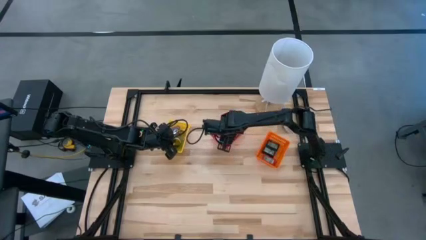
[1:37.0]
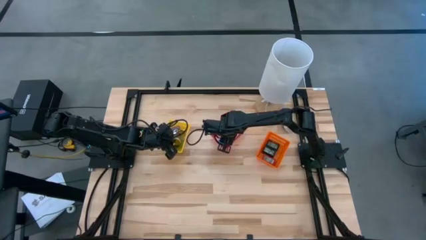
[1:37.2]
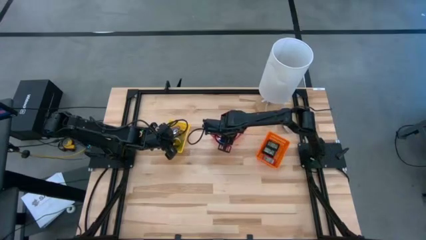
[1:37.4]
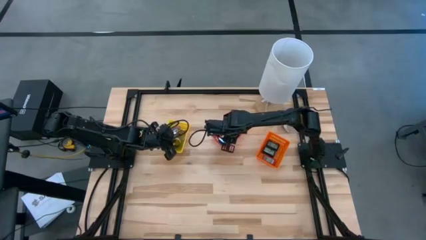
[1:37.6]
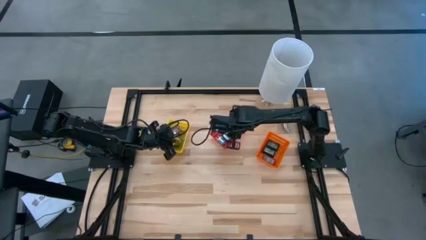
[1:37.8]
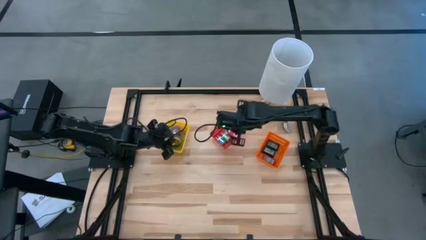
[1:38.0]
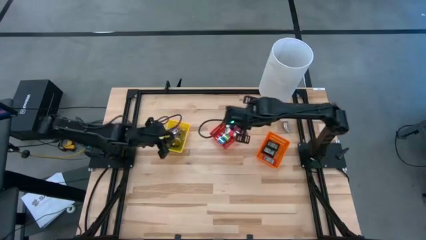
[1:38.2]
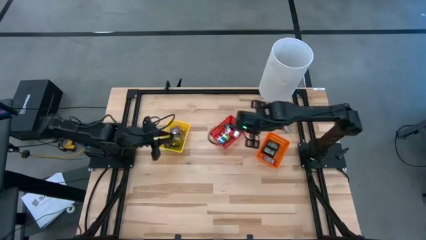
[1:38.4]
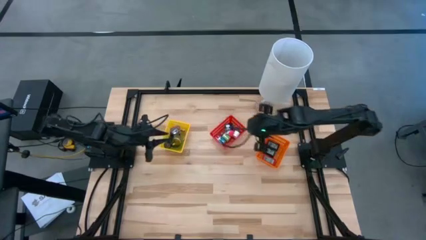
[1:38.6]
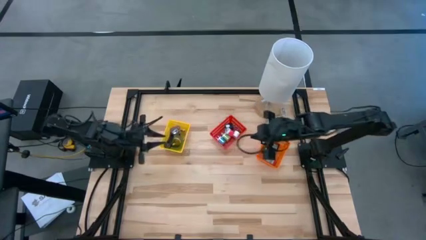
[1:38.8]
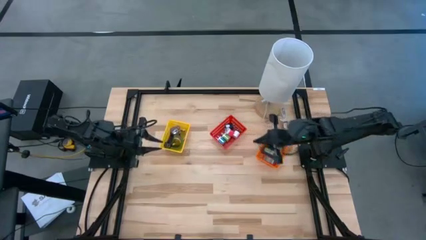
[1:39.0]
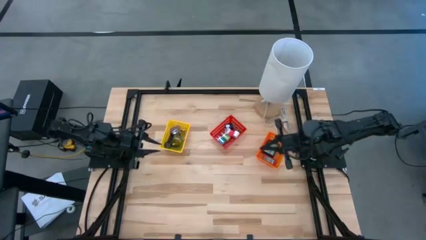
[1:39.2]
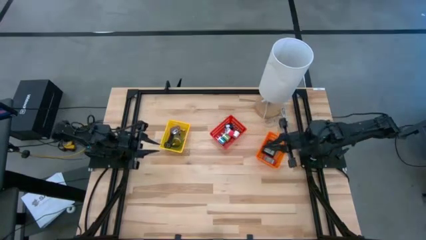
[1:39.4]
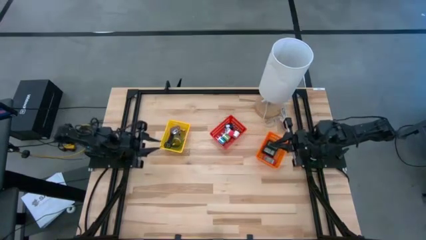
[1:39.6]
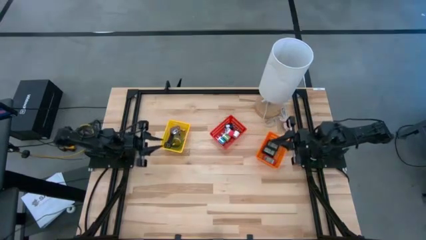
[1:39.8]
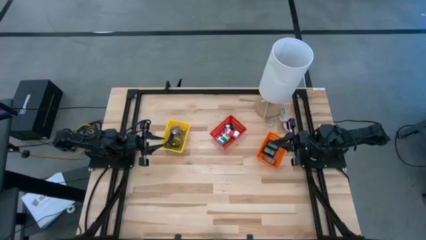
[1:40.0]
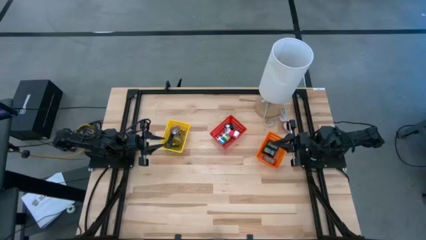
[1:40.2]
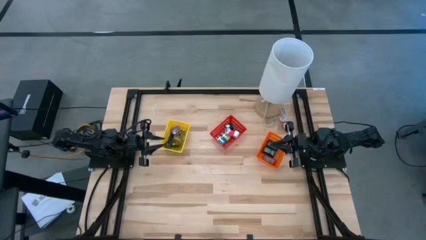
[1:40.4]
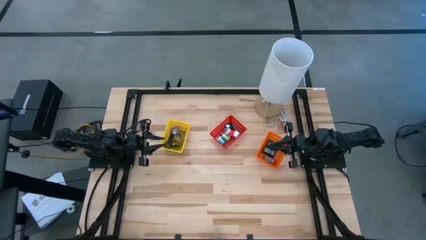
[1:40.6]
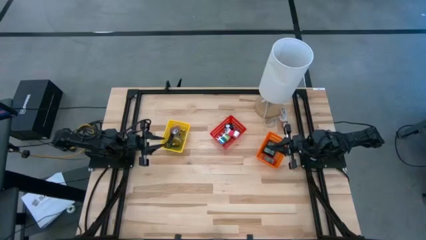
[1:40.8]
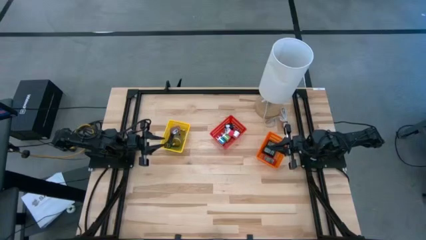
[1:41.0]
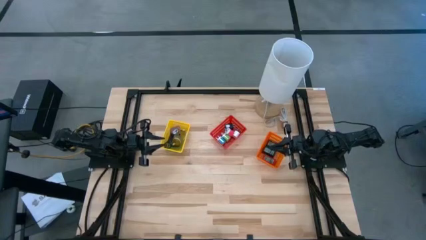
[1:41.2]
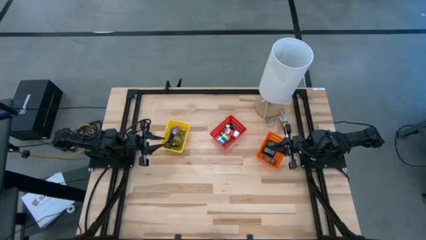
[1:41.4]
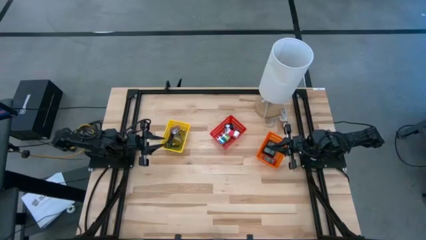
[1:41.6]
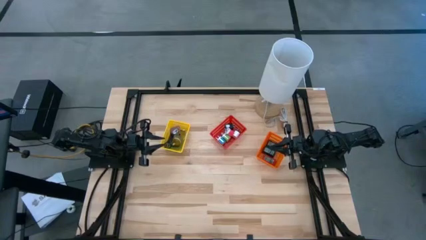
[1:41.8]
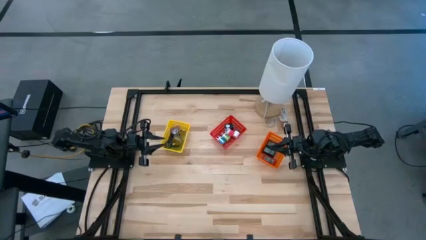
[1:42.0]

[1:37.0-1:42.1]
Task: Pick & Place Office items
Return to Home Position

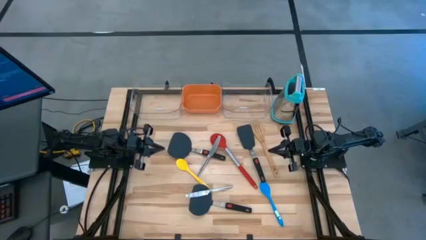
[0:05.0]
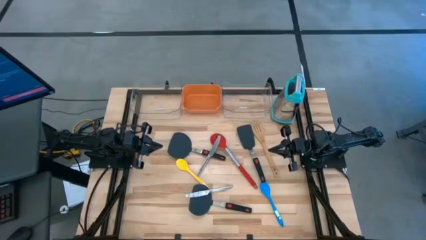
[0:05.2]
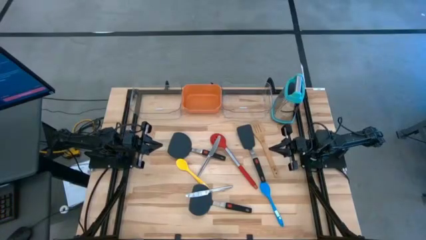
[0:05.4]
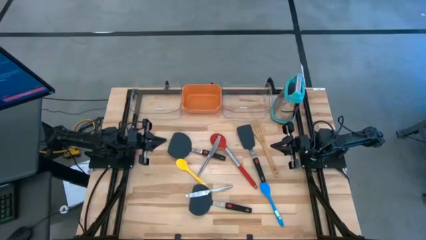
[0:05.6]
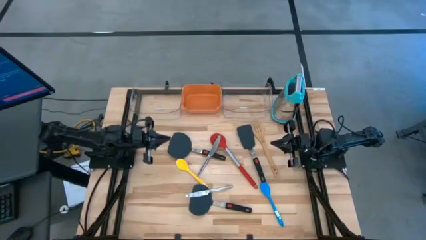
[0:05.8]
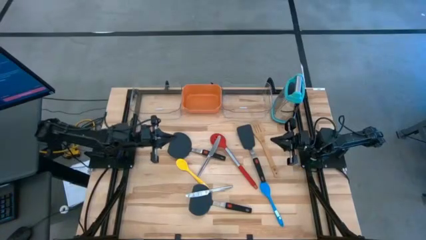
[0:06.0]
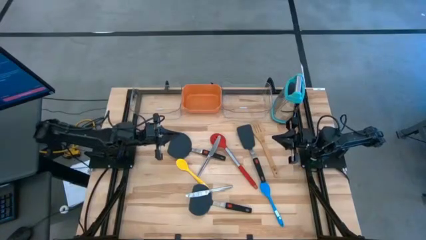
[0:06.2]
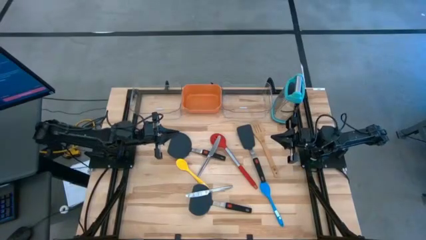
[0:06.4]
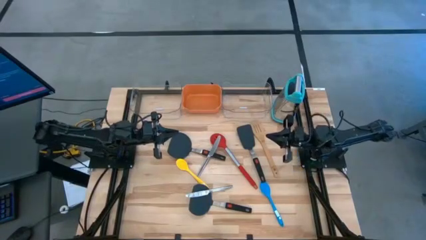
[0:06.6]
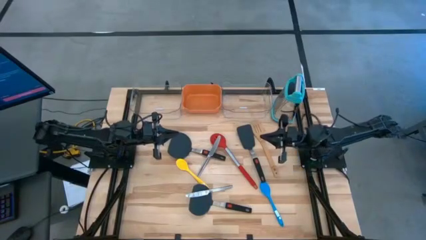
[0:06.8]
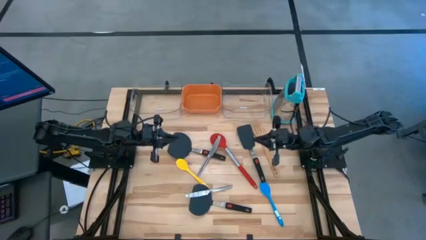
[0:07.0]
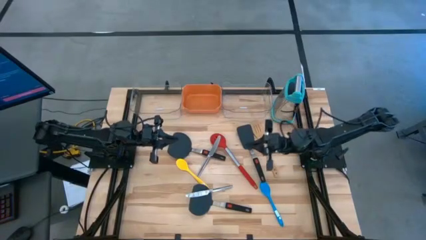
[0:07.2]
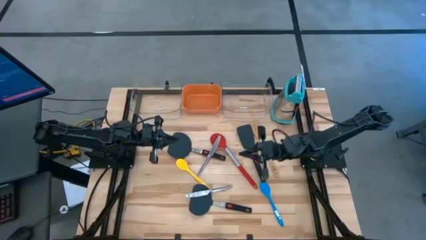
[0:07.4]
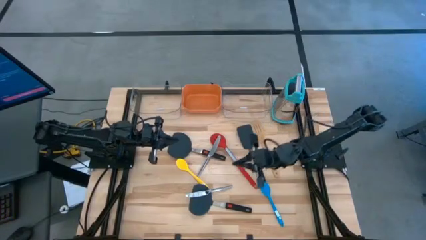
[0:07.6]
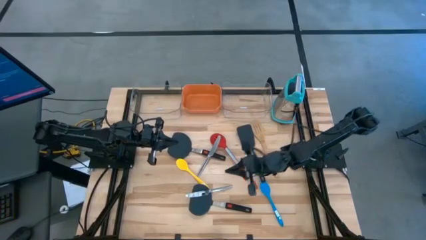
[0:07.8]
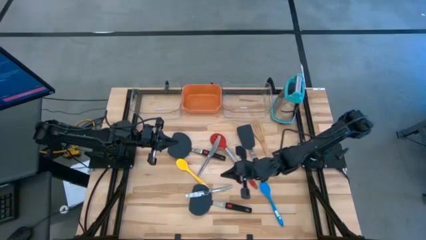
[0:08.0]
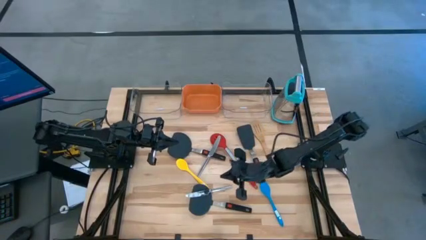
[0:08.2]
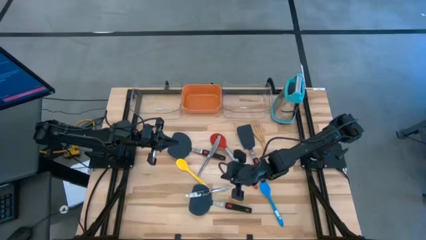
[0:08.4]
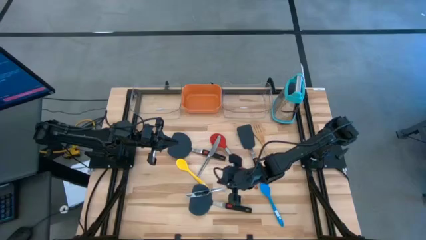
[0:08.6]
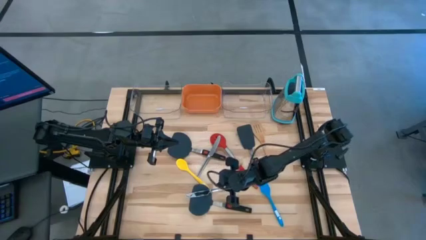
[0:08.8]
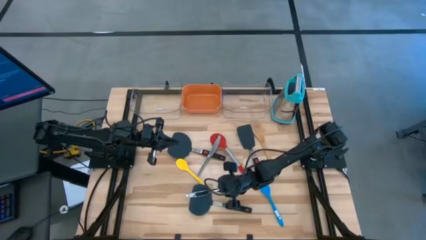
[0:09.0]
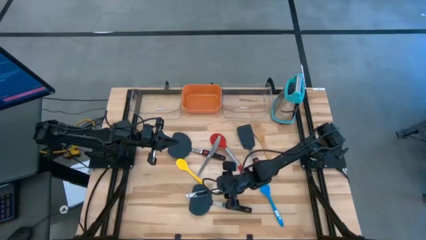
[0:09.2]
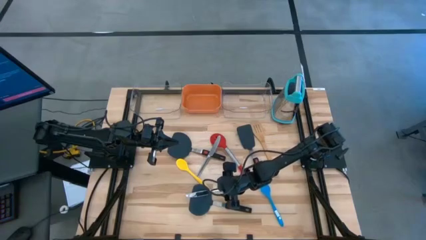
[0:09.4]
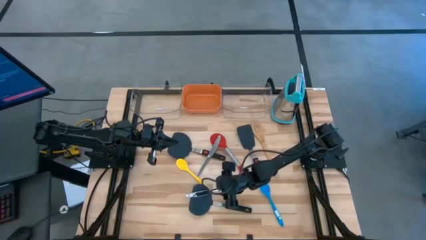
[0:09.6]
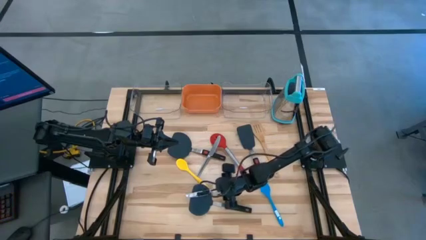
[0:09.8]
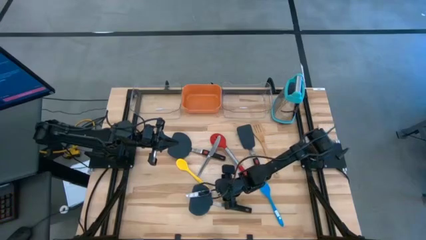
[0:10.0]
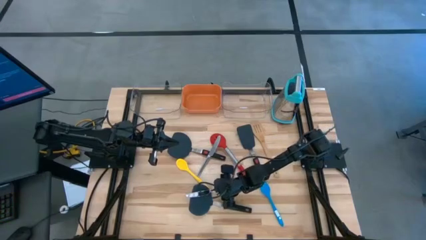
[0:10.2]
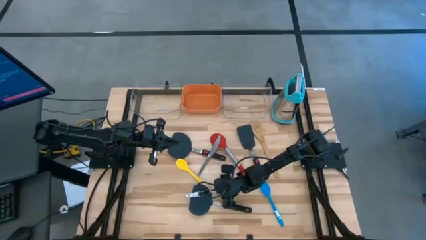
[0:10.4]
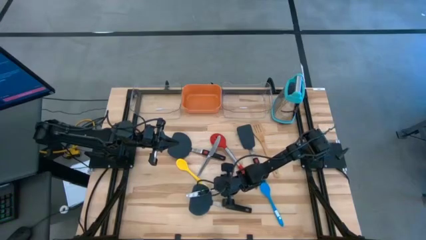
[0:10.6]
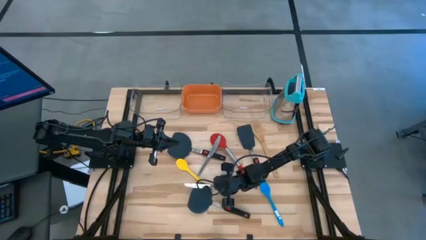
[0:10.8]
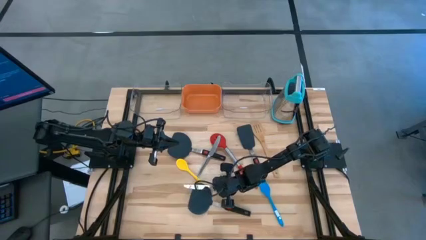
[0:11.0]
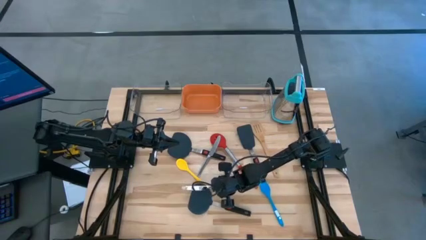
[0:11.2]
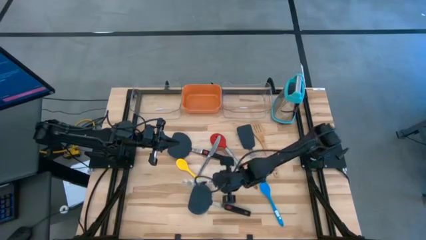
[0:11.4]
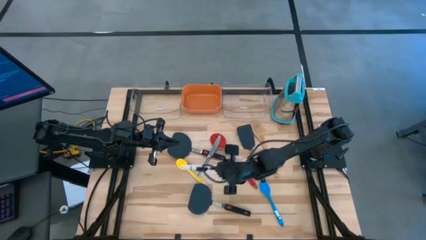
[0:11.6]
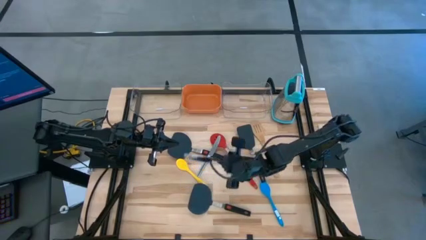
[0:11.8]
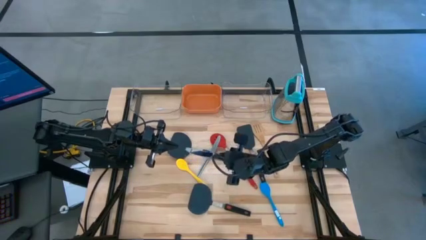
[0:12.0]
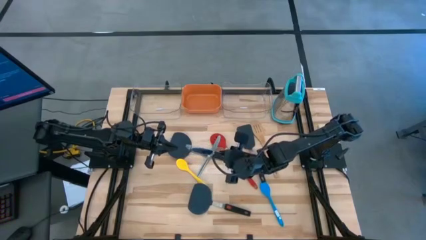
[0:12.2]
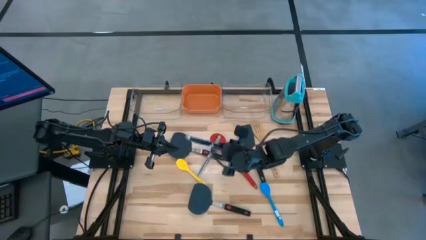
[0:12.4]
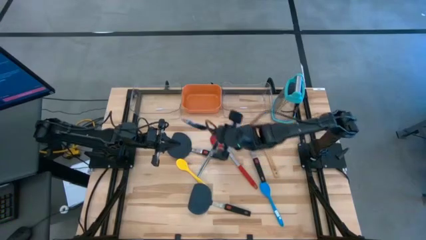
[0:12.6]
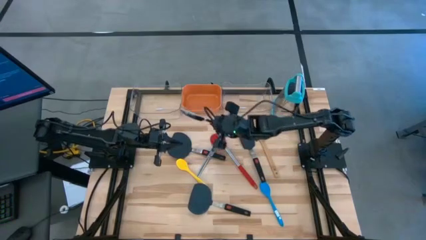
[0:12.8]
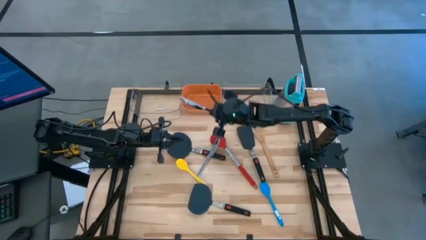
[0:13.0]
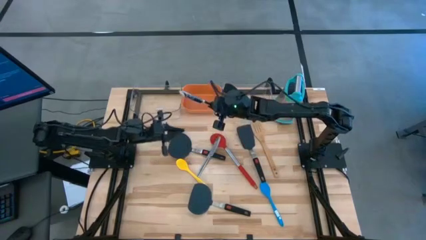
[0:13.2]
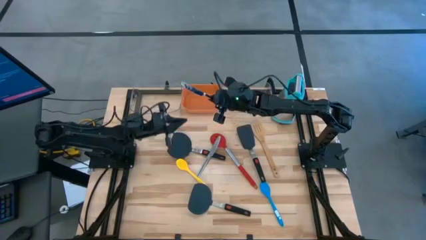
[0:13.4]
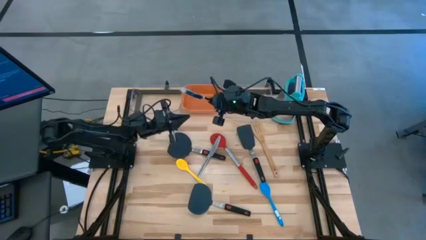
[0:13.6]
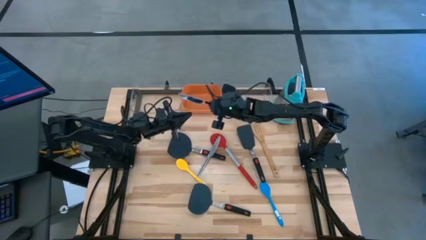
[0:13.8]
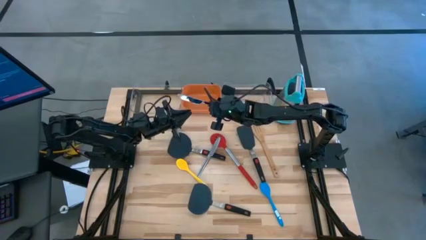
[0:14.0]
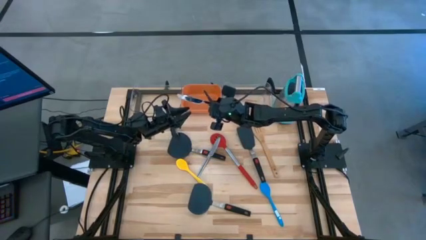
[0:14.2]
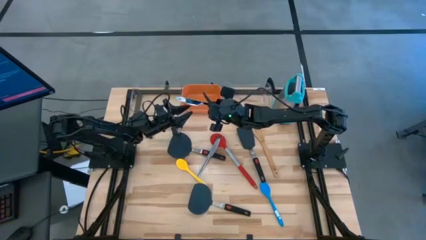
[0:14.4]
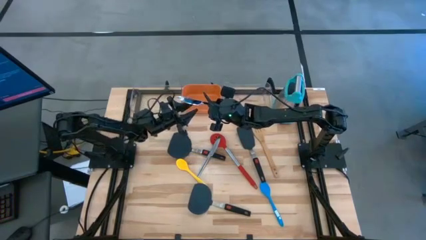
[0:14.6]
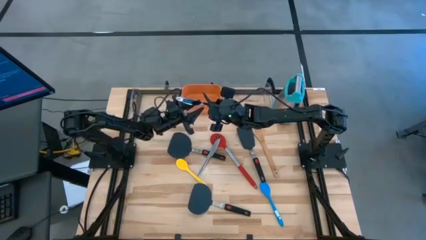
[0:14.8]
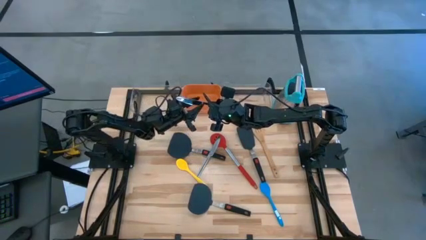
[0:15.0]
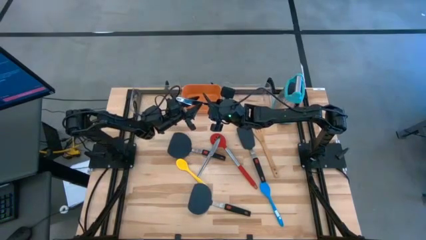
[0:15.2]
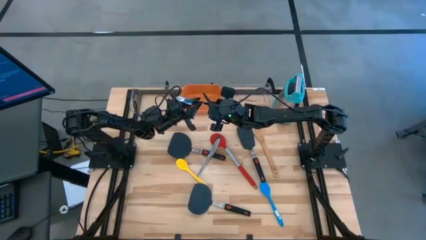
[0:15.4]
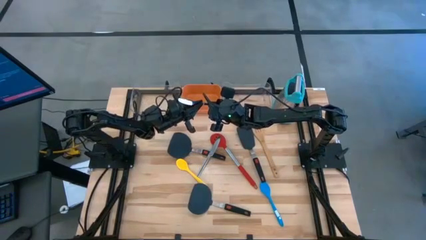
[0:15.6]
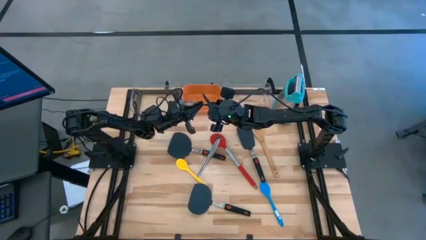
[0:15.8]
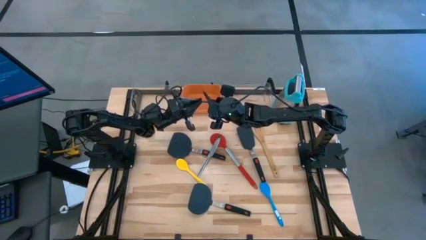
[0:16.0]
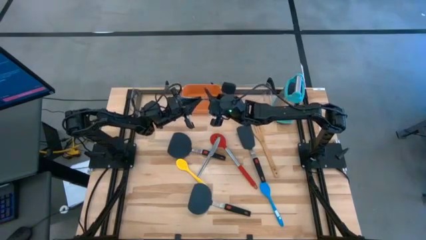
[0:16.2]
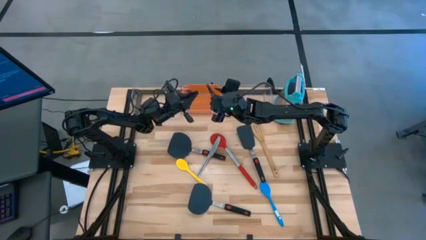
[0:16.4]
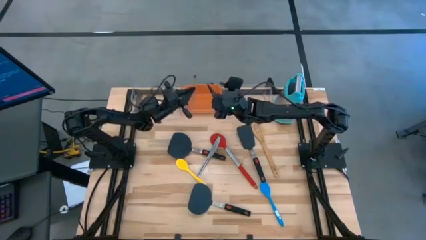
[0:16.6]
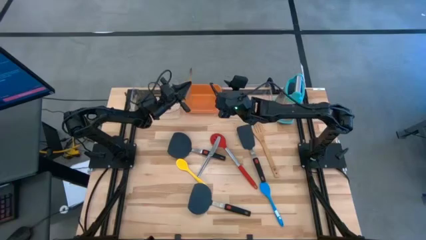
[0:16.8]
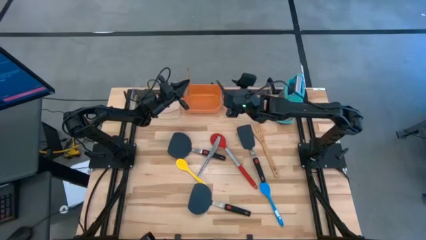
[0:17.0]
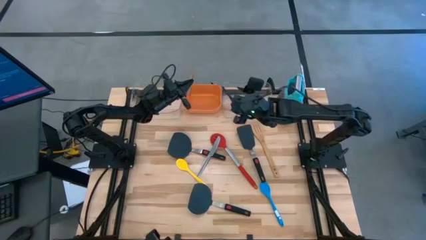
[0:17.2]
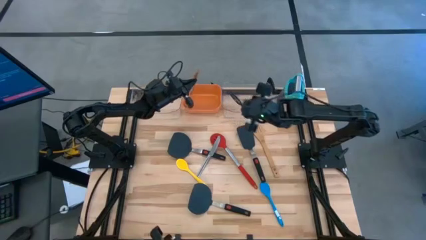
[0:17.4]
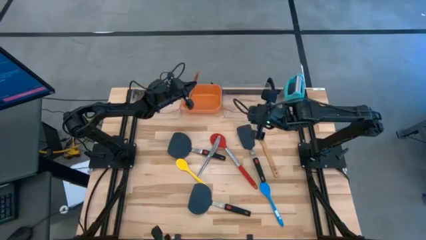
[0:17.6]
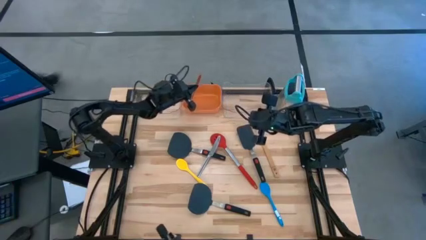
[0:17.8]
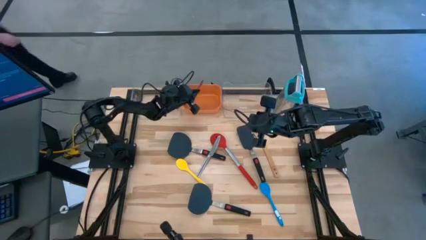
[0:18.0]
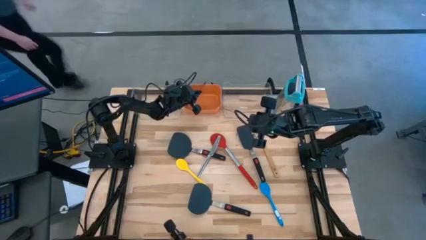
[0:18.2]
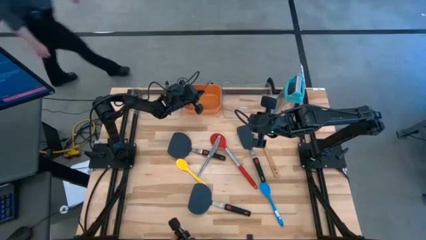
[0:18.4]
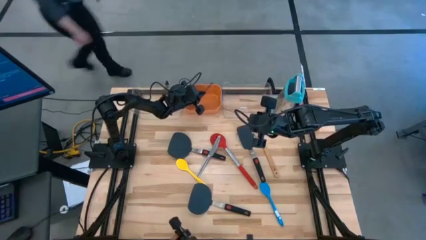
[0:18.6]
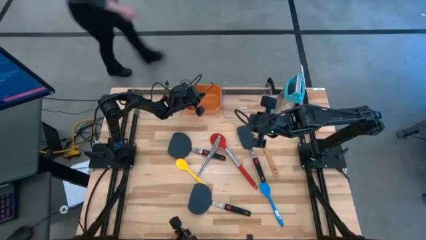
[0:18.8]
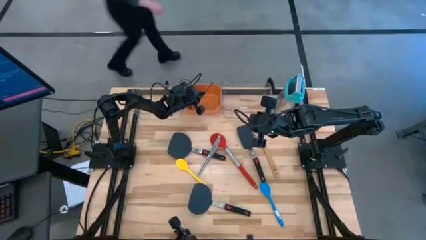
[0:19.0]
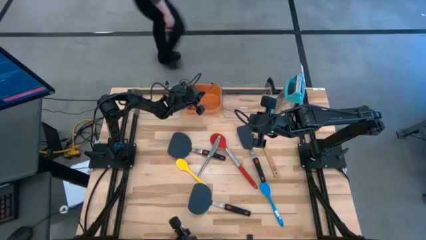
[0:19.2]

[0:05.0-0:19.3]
Task: Pick & Place Kitchen Items
Put the silver table knife into the orange bin
